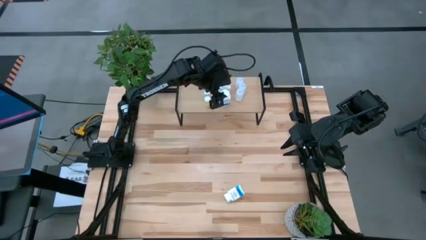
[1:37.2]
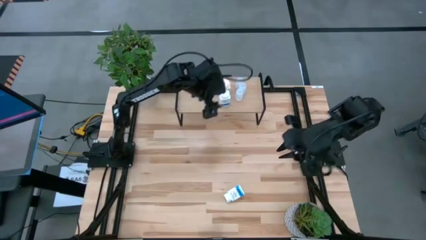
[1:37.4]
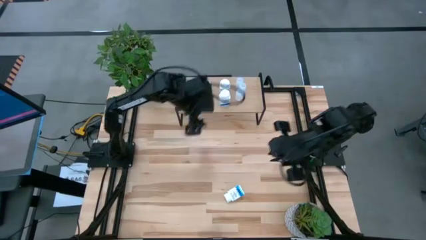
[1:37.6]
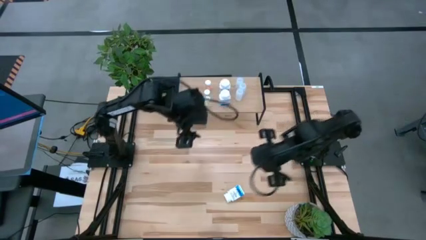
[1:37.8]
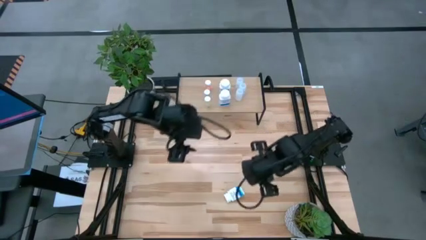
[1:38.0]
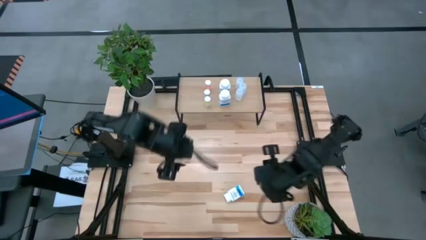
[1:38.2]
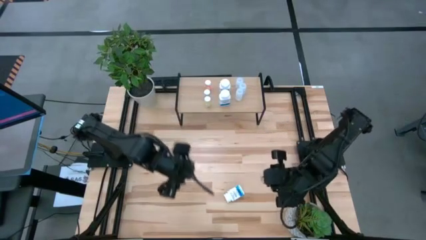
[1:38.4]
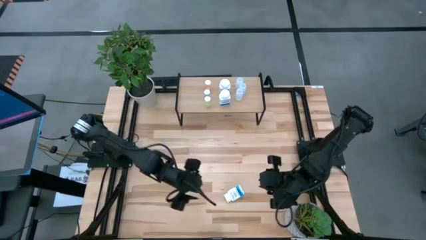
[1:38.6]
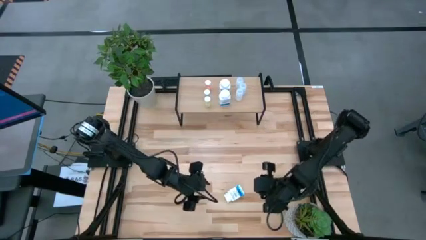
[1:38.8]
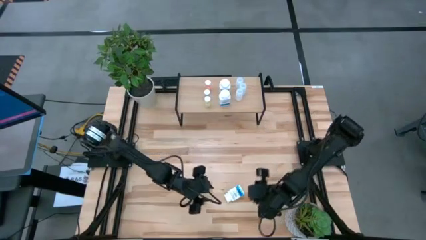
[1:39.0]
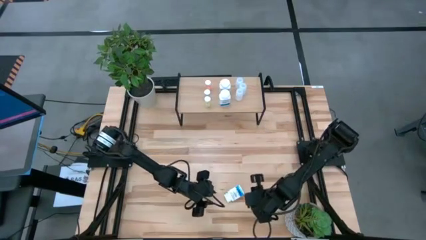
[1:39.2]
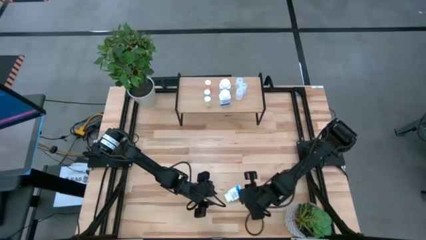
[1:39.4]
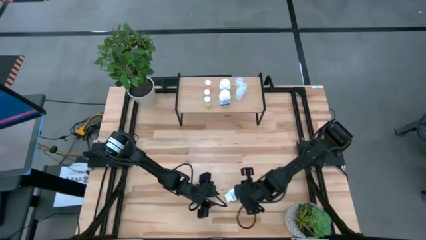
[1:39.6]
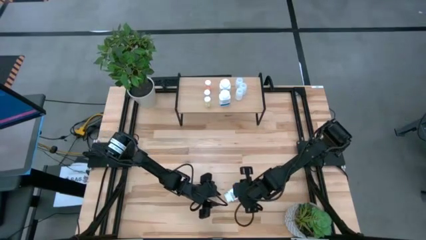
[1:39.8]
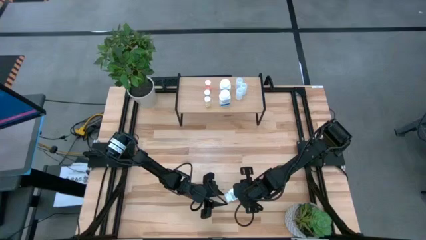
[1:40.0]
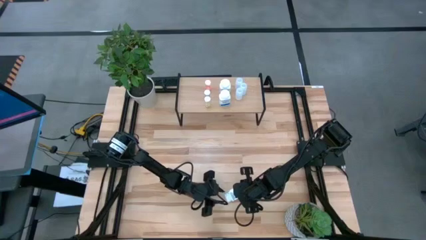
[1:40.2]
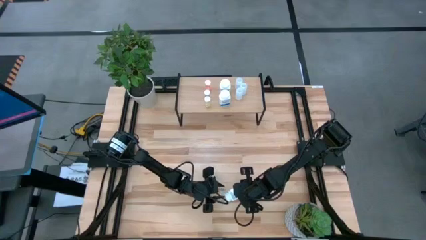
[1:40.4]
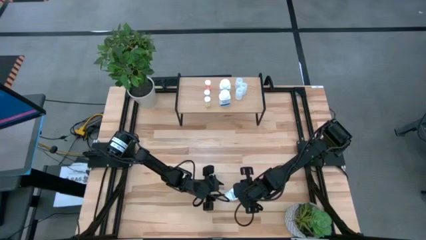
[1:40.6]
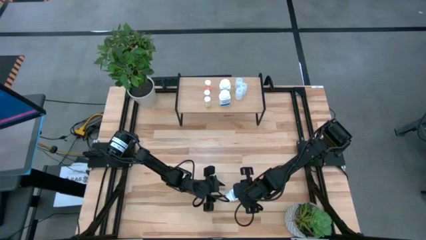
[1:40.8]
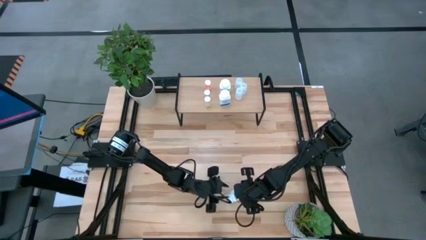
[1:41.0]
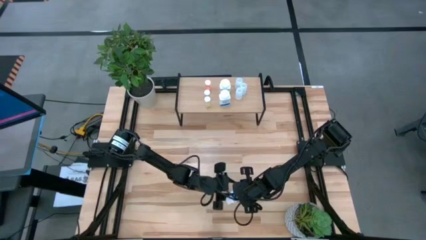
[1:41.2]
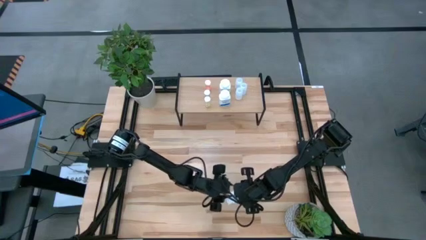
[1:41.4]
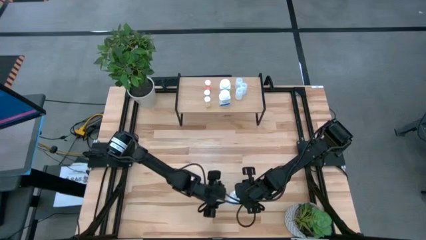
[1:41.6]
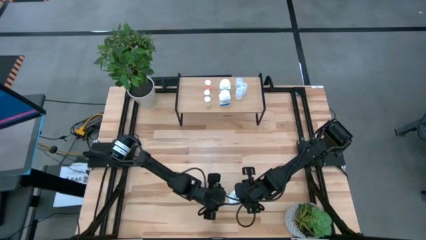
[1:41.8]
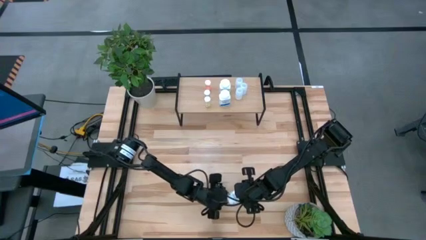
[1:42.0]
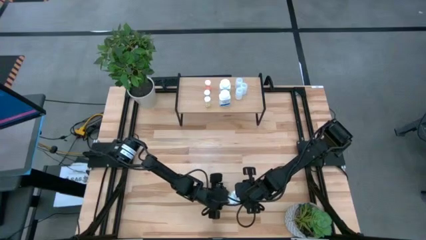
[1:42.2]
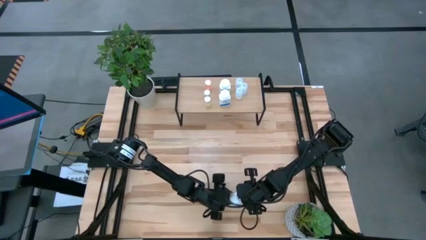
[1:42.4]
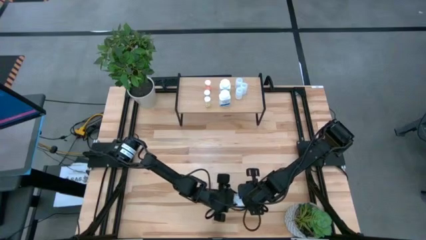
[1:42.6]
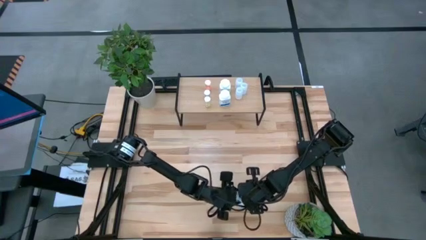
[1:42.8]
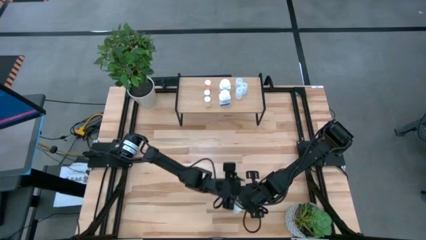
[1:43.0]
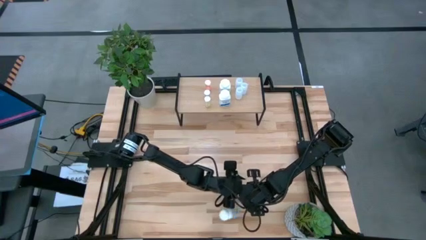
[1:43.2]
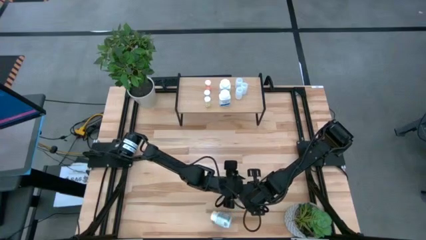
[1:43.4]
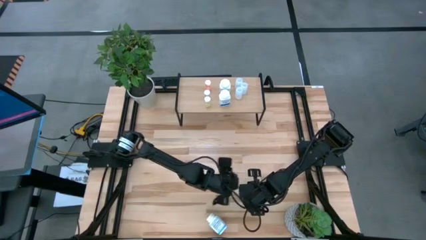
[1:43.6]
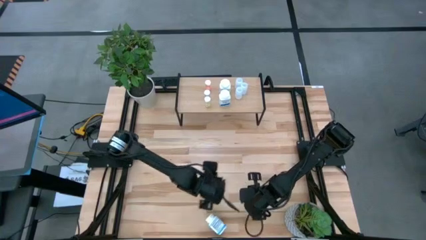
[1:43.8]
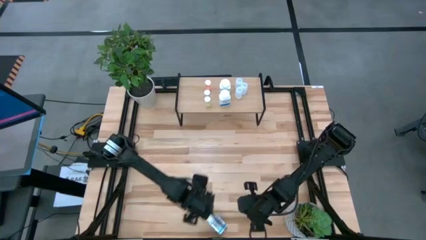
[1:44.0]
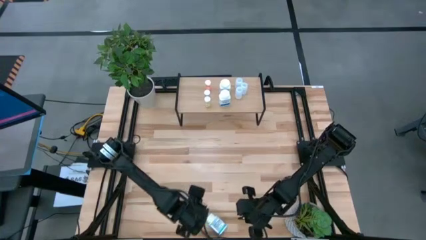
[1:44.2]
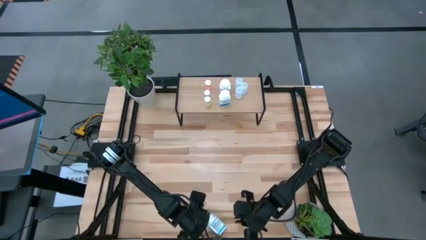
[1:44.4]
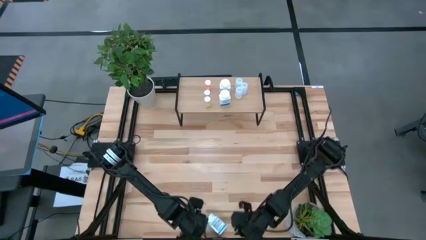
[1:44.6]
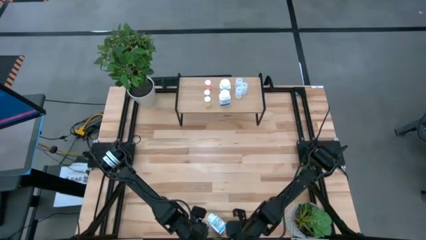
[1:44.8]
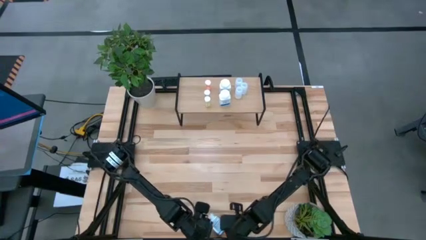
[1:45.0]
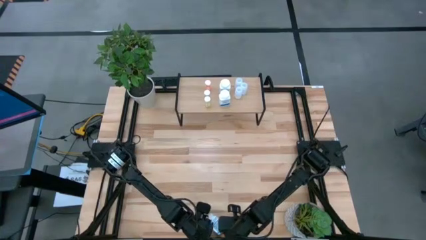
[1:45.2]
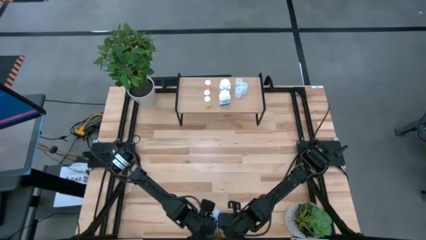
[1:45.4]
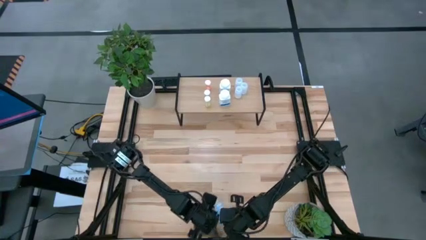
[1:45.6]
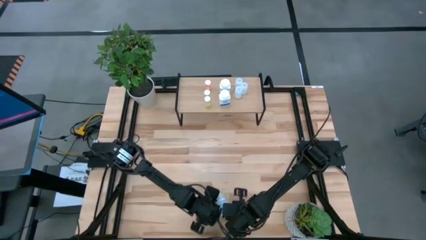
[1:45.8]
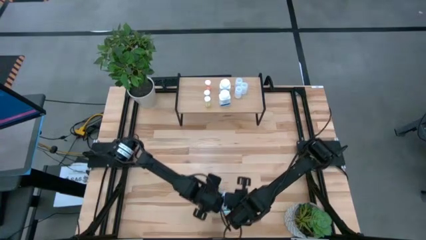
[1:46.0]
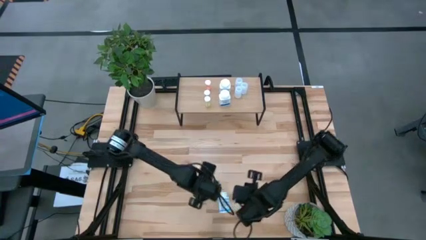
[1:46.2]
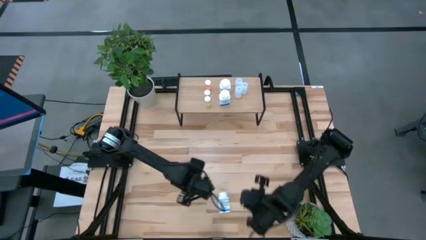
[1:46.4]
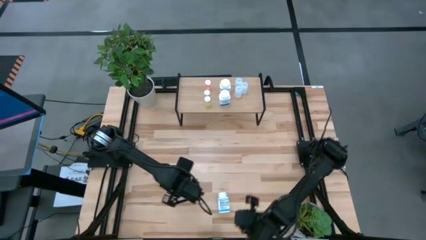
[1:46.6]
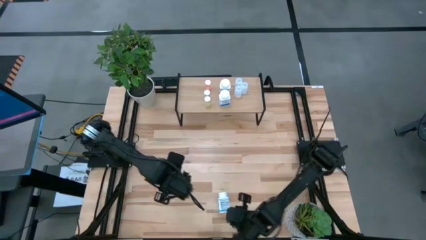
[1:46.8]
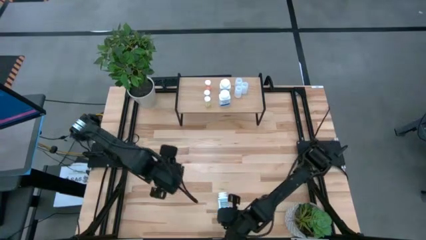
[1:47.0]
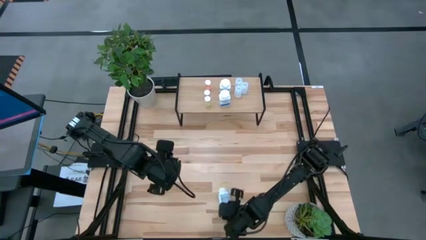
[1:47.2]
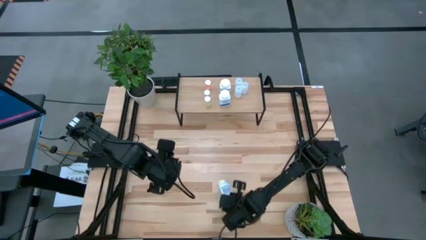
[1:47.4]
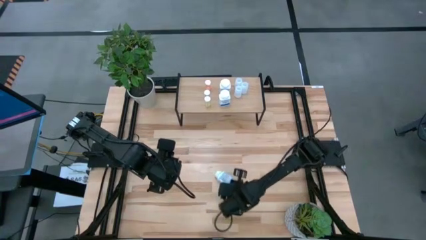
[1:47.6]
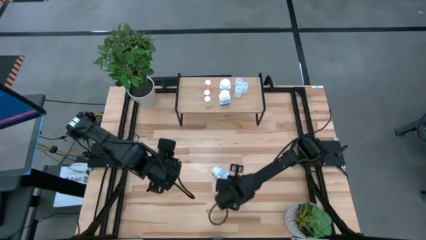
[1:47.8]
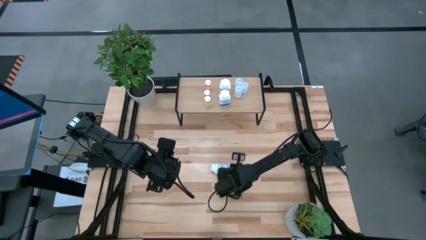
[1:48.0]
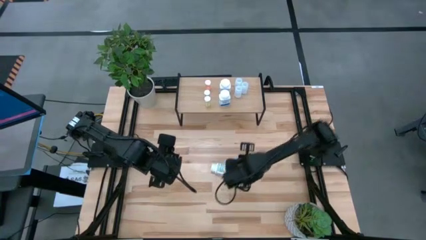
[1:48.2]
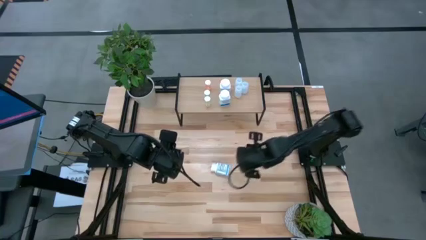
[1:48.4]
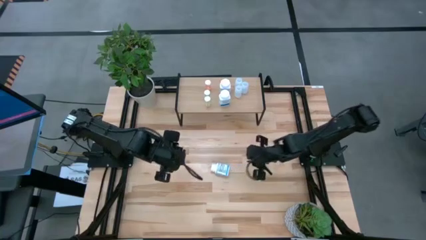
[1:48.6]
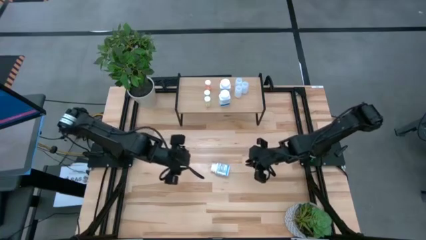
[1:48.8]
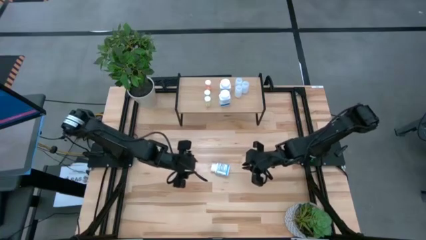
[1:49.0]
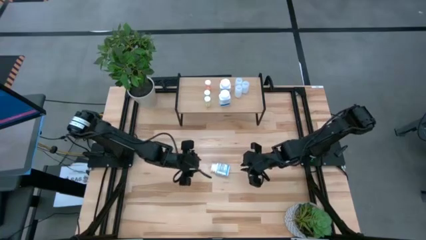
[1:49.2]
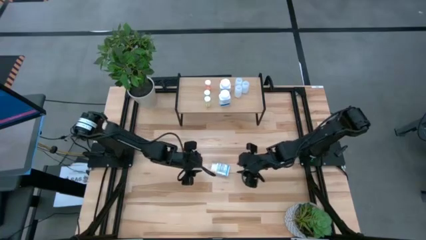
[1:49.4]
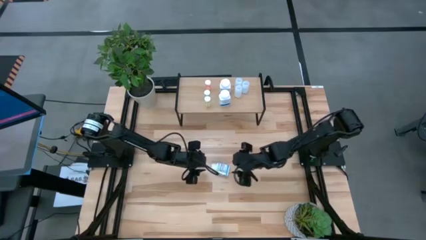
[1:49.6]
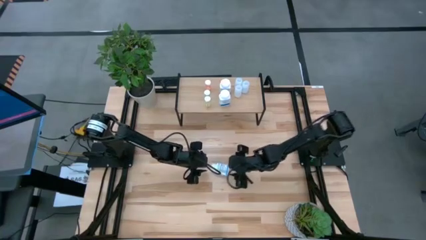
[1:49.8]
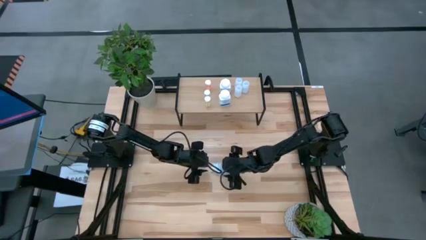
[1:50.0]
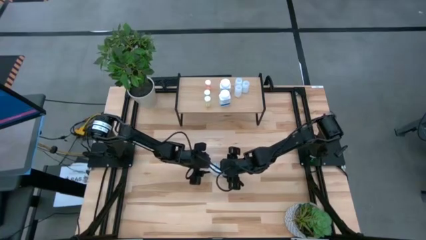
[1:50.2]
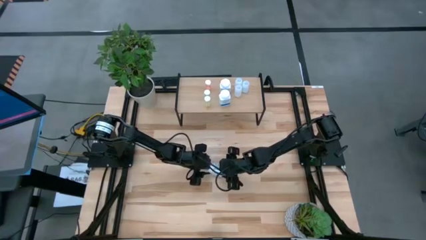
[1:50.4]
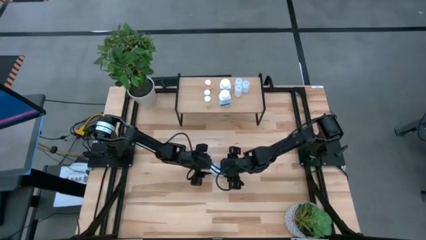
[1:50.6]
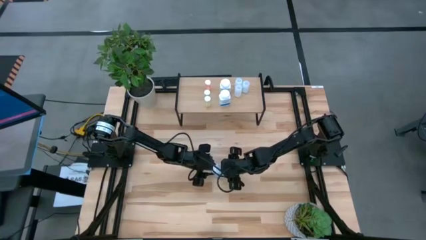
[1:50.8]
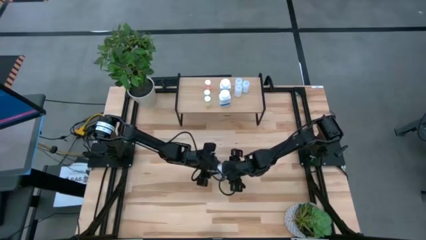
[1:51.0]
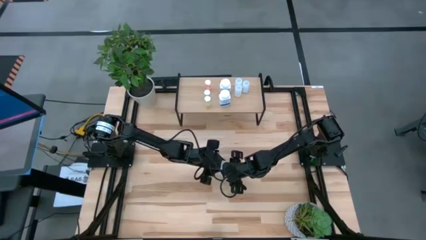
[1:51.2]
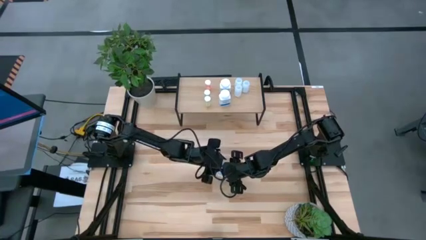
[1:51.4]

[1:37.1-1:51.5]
Task: Pick and place medicine bottles onto shelf by color
Put the white and blue pill bottle on the shelf aligned with white and blue pill bottles

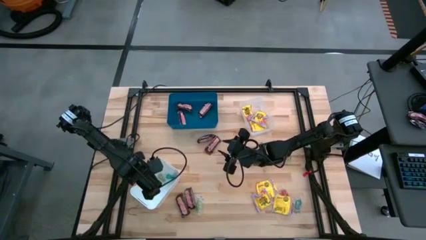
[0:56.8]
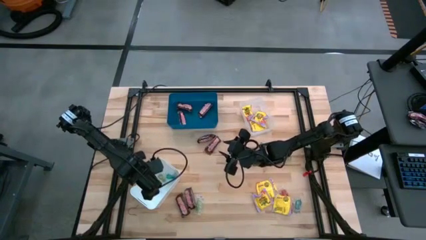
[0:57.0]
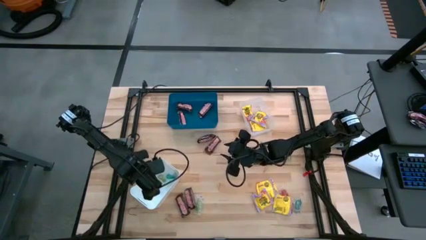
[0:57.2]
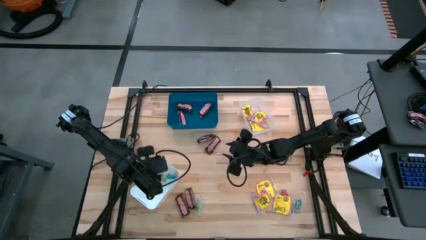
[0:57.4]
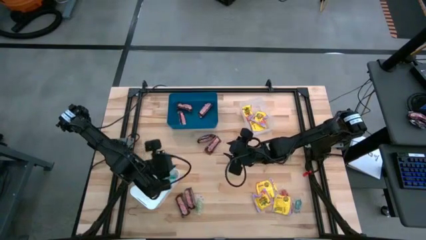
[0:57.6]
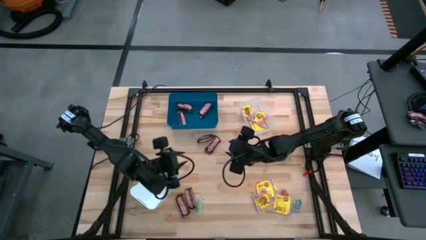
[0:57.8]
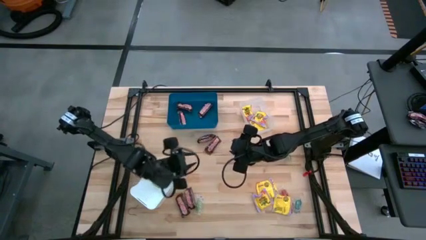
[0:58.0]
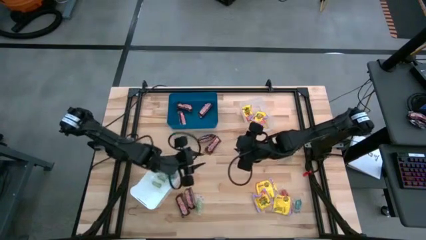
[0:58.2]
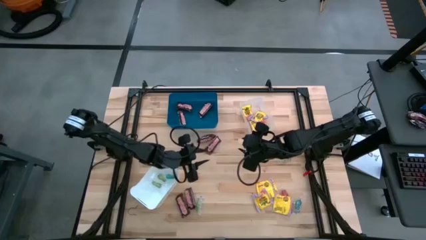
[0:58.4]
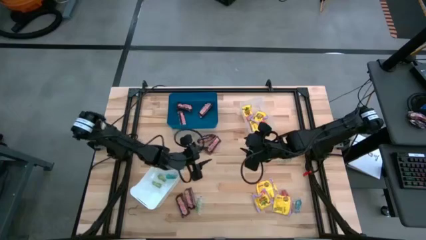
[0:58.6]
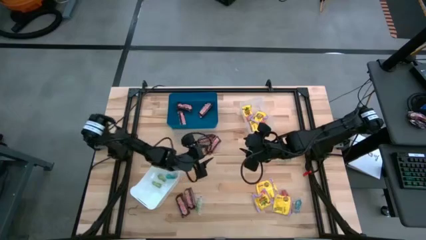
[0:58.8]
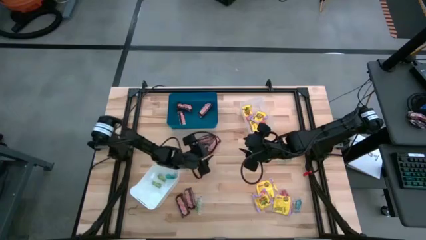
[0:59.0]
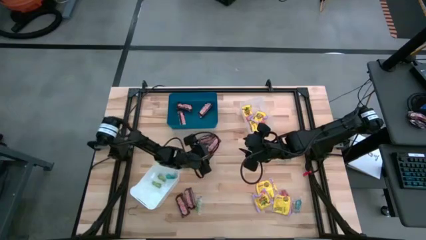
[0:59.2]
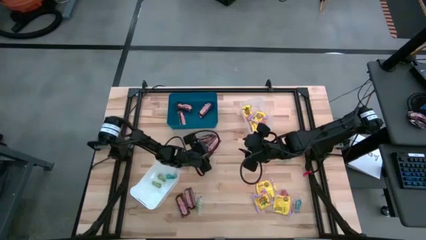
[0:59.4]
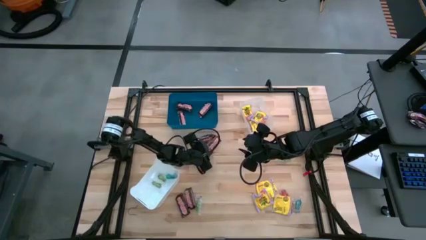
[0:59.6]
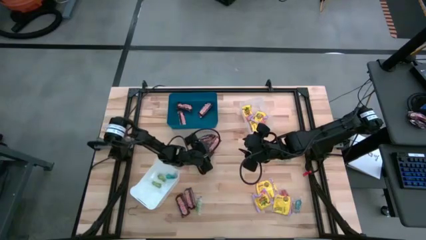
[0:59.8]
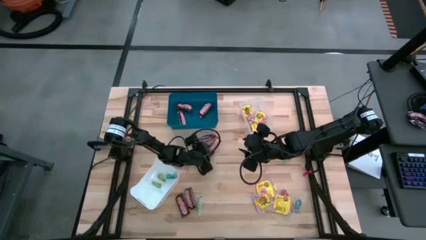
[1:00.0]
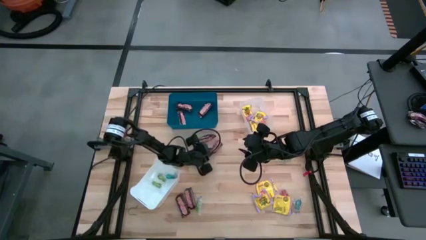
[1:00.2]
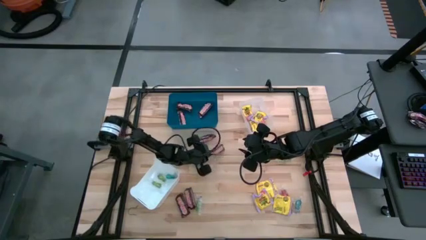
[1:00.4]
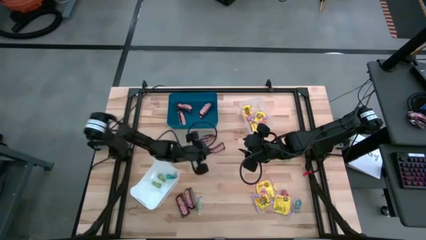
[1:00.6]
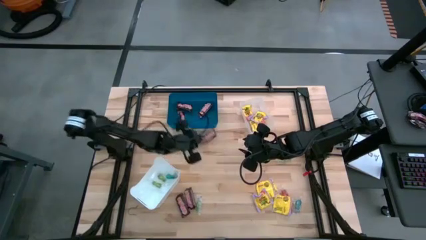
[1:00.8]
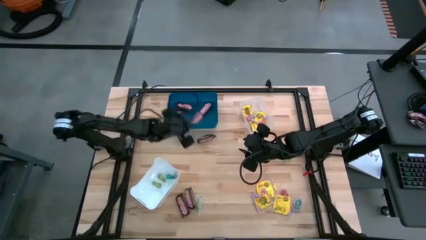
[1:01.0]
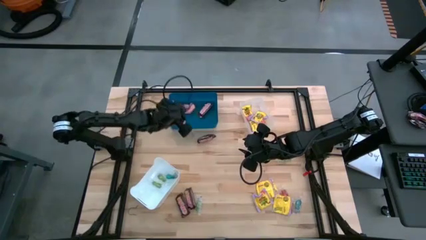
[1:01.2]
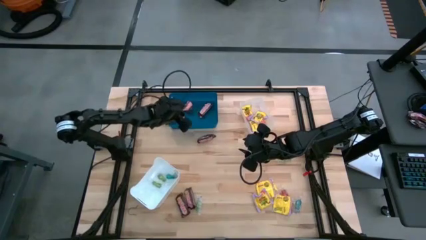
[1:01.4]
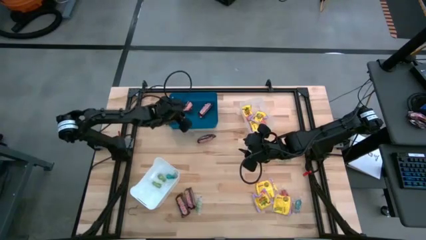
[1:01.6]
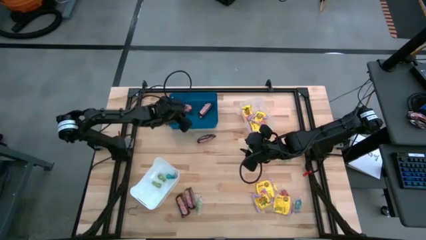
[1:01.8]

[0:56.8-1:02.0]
Task: Sort candy
Put the brown chocolate into the blue bin
